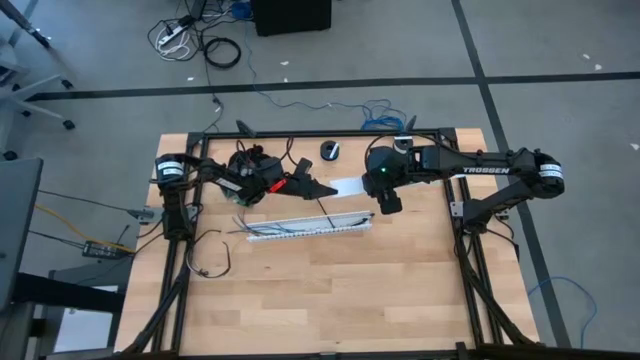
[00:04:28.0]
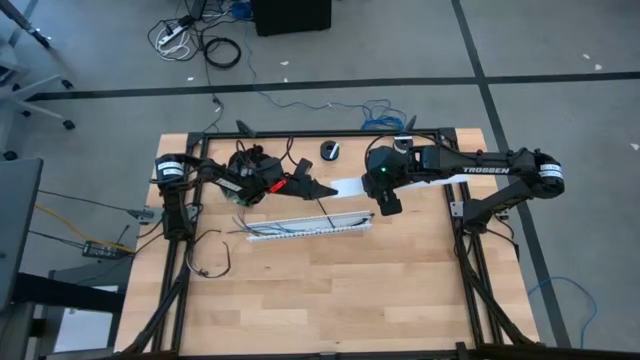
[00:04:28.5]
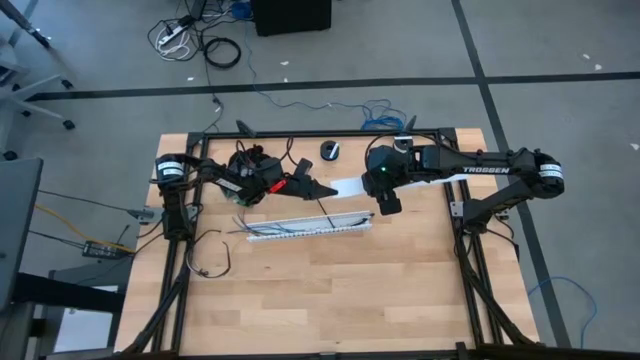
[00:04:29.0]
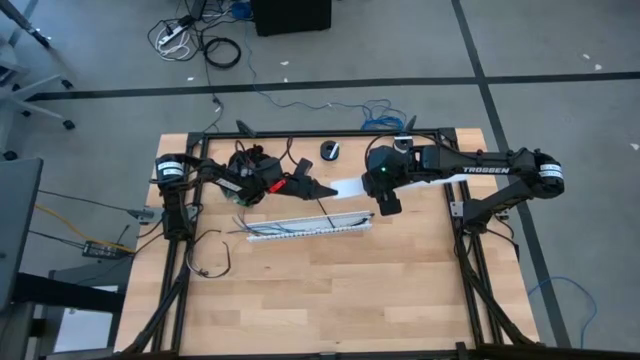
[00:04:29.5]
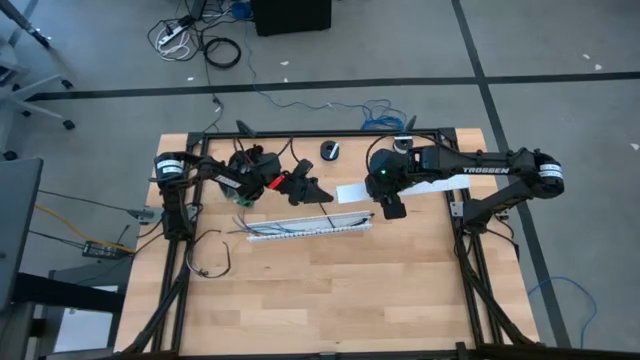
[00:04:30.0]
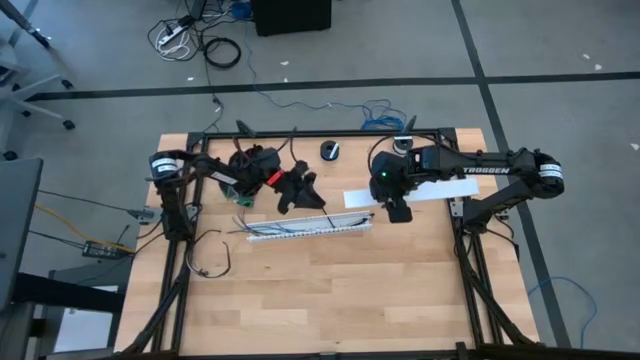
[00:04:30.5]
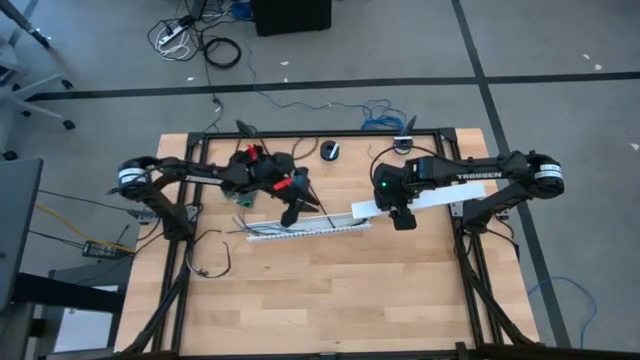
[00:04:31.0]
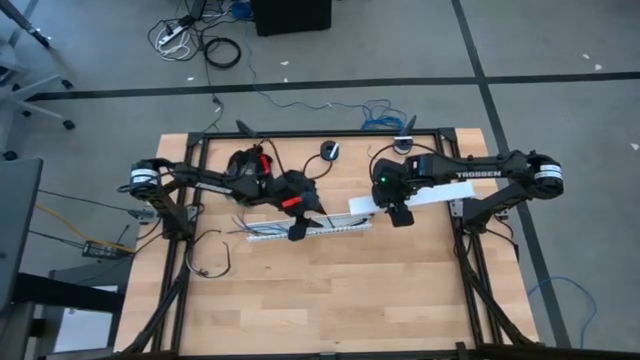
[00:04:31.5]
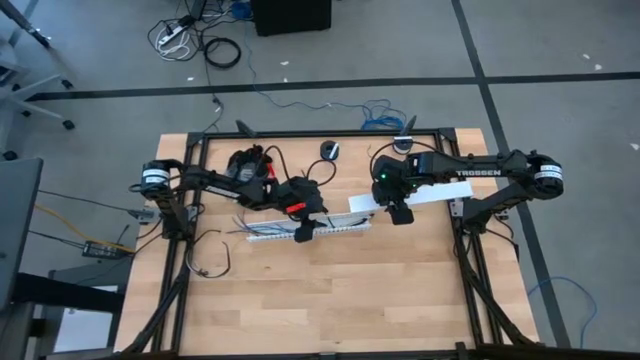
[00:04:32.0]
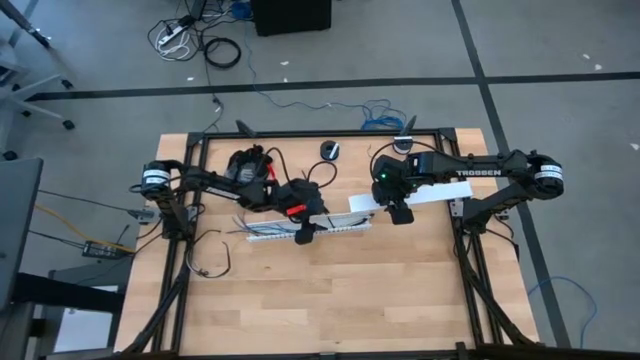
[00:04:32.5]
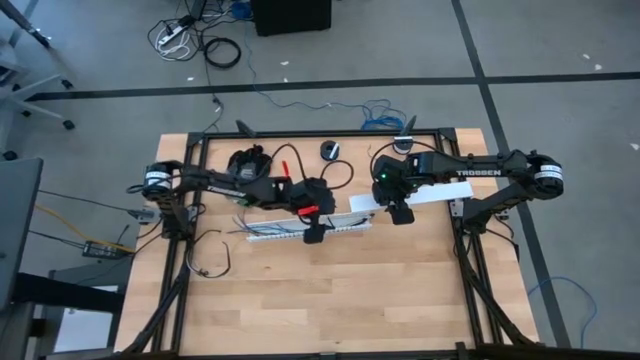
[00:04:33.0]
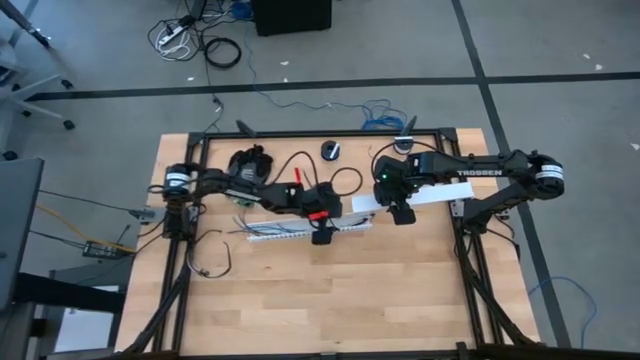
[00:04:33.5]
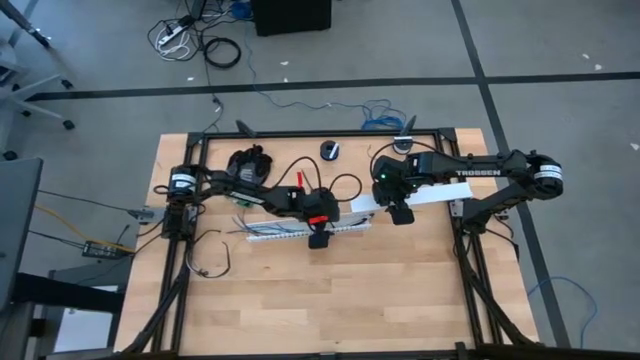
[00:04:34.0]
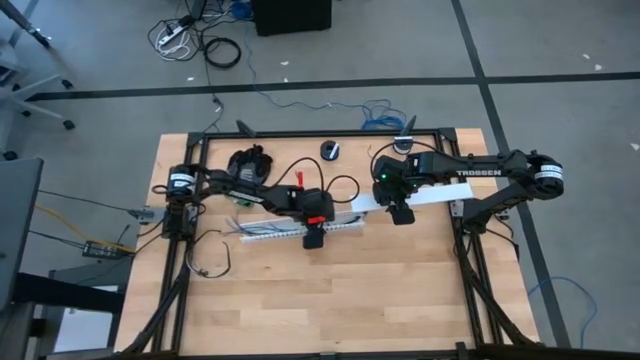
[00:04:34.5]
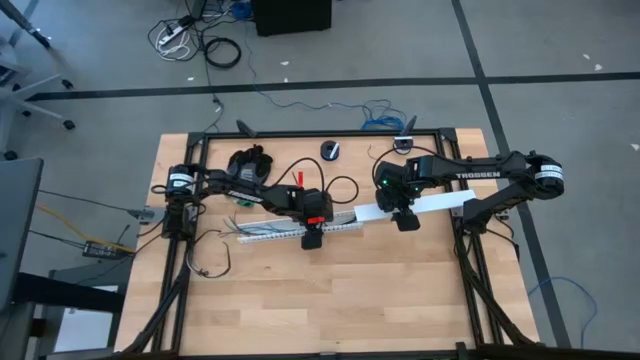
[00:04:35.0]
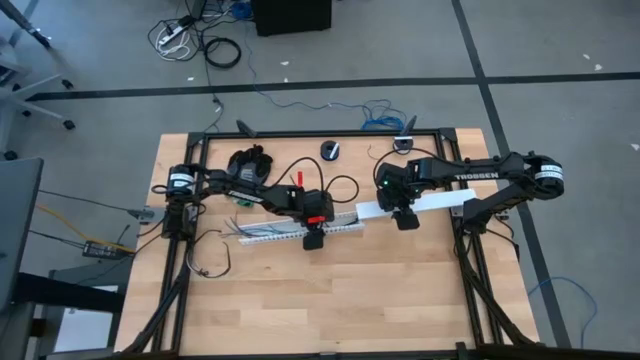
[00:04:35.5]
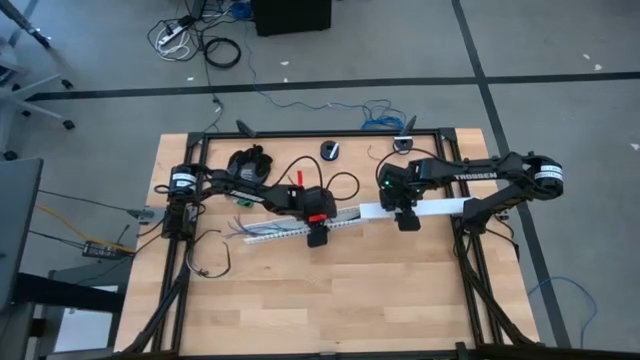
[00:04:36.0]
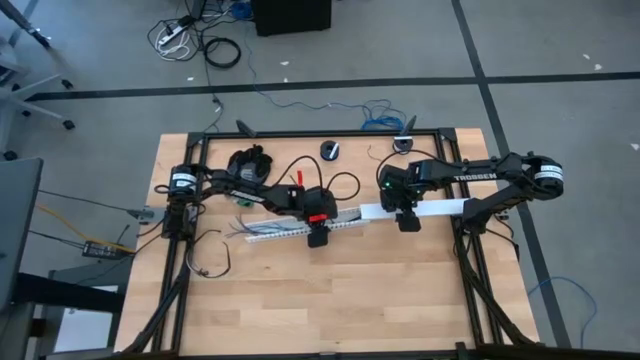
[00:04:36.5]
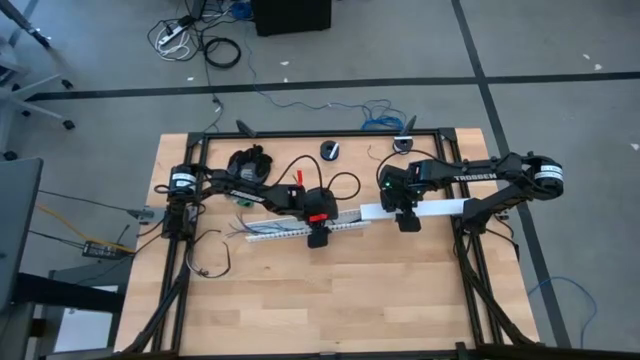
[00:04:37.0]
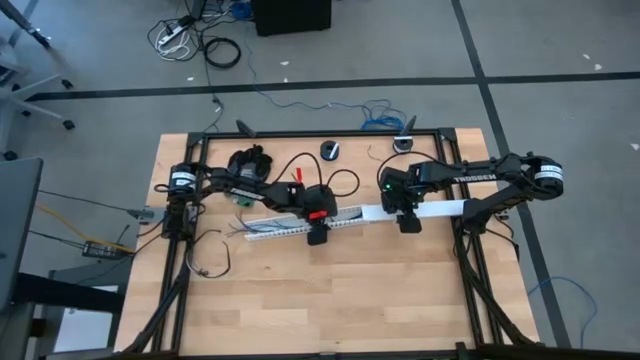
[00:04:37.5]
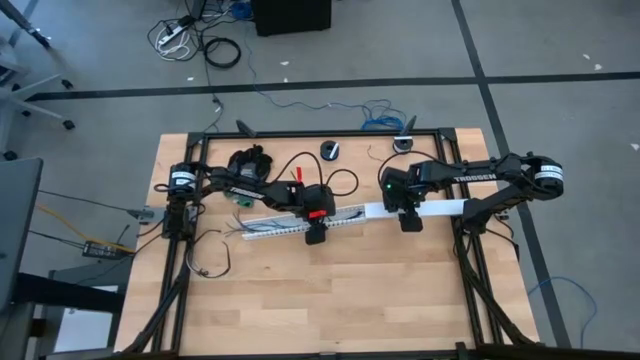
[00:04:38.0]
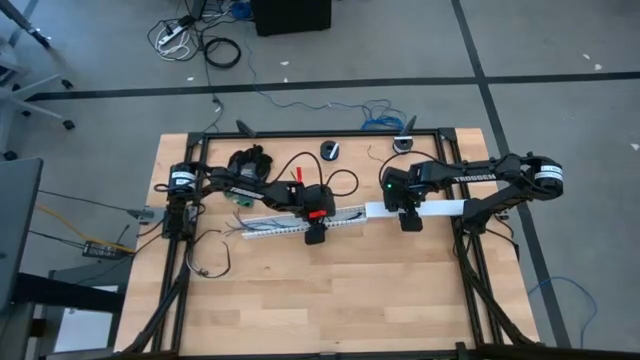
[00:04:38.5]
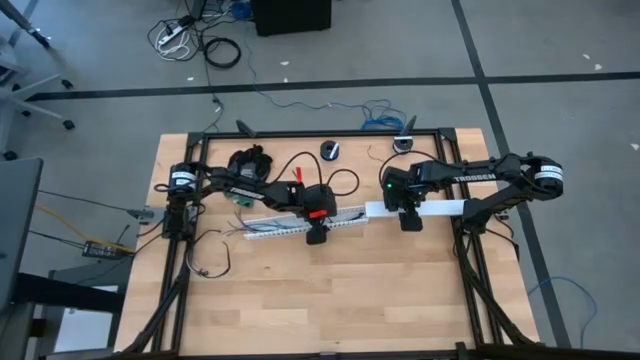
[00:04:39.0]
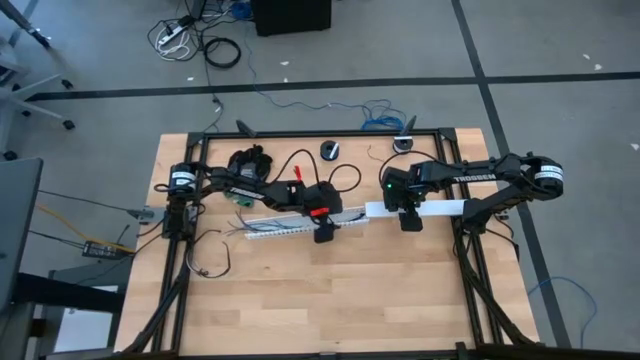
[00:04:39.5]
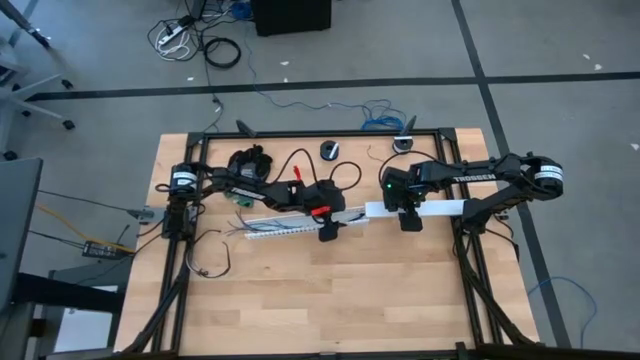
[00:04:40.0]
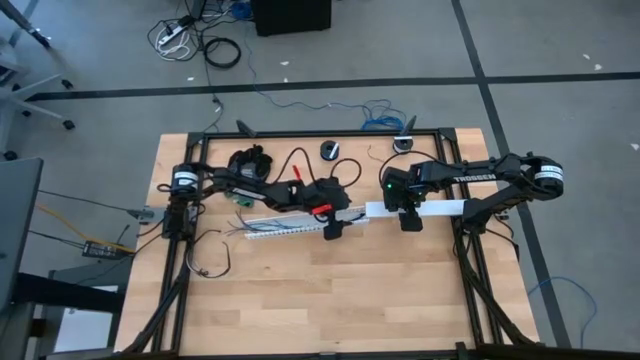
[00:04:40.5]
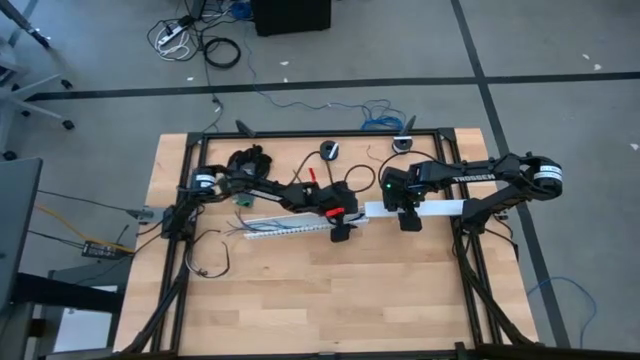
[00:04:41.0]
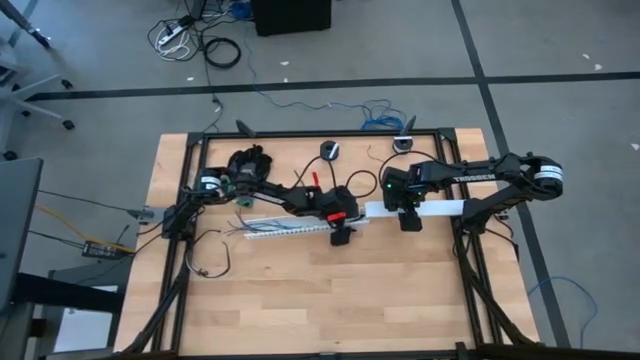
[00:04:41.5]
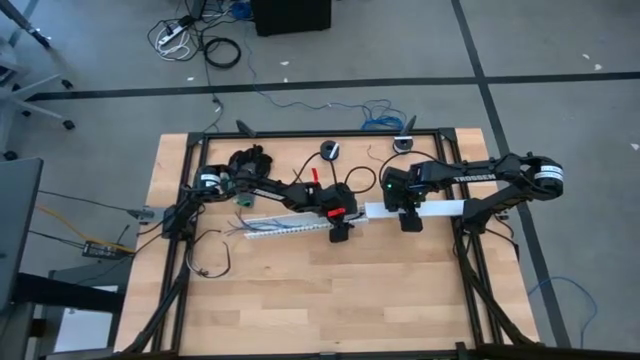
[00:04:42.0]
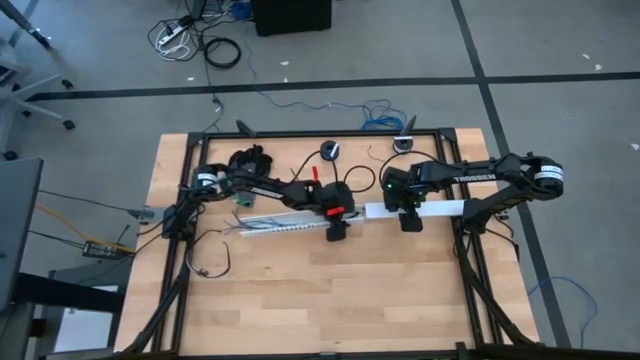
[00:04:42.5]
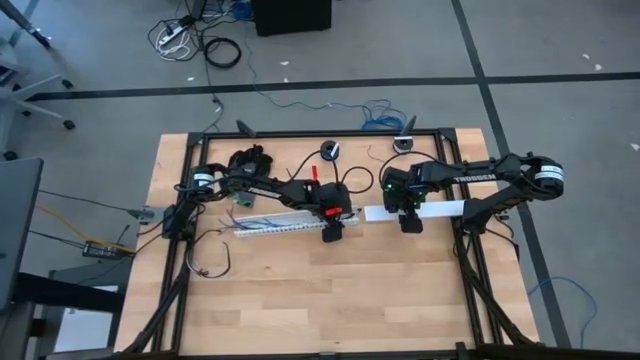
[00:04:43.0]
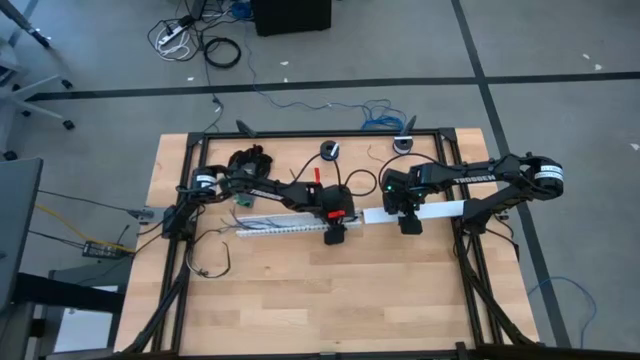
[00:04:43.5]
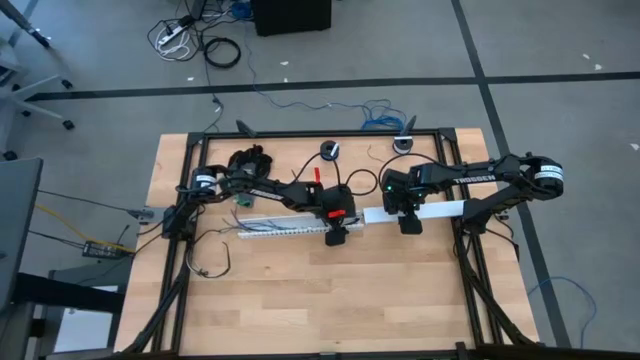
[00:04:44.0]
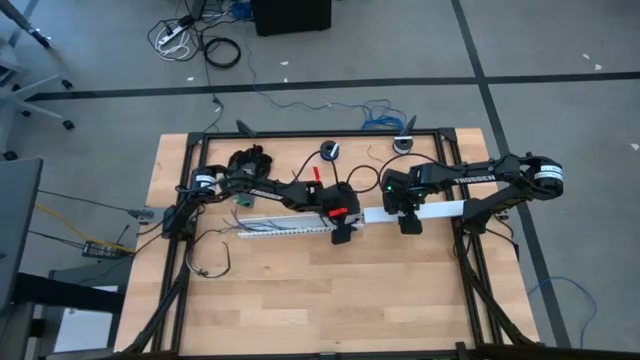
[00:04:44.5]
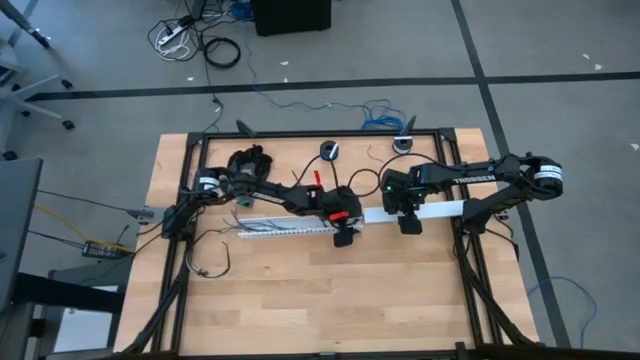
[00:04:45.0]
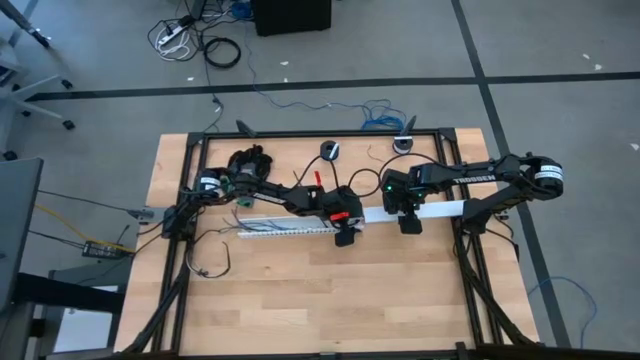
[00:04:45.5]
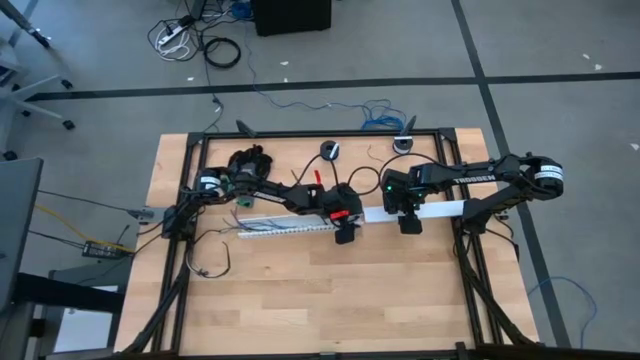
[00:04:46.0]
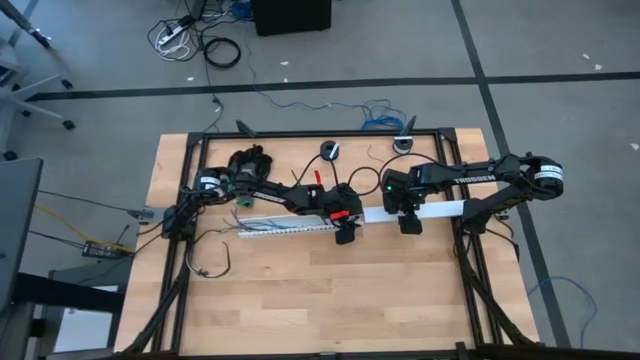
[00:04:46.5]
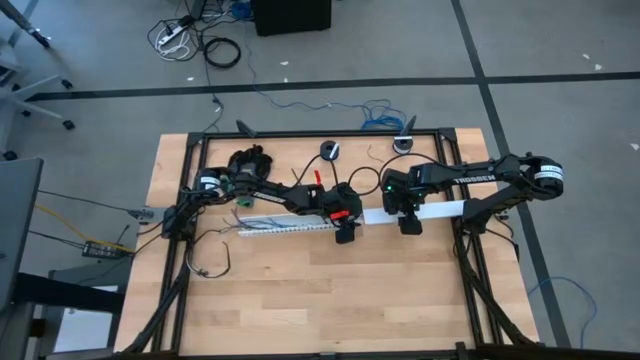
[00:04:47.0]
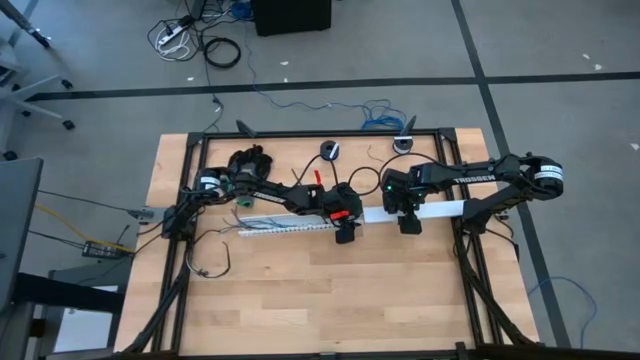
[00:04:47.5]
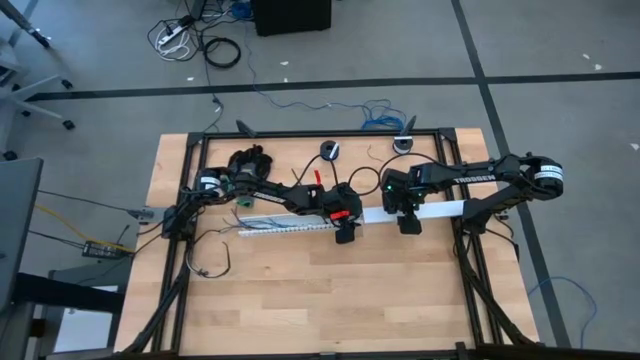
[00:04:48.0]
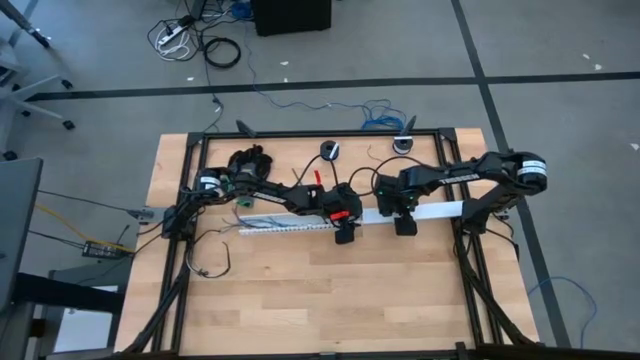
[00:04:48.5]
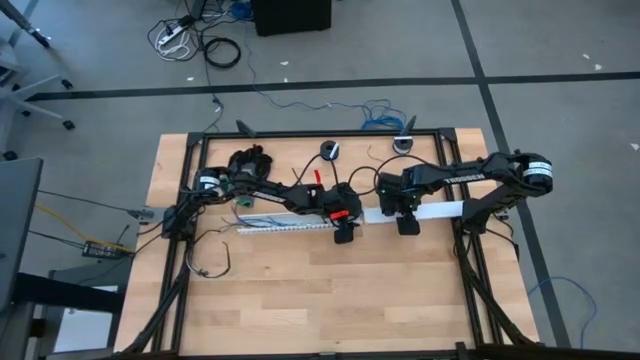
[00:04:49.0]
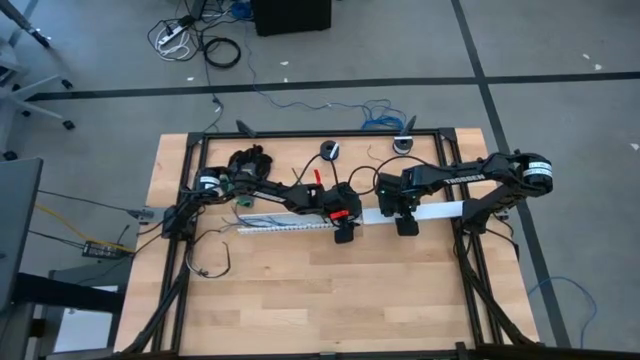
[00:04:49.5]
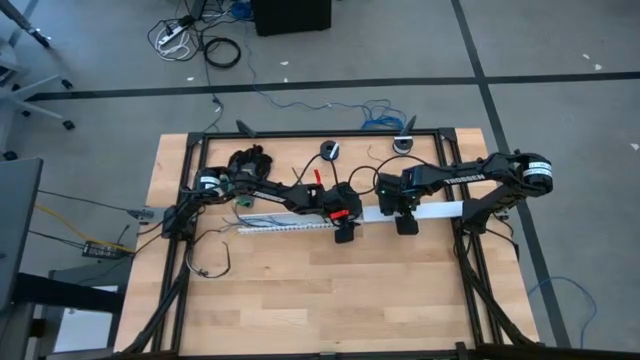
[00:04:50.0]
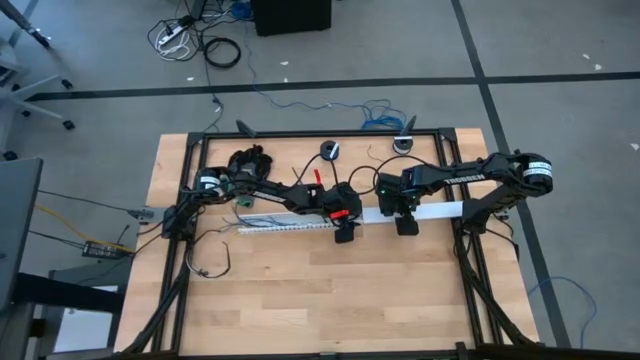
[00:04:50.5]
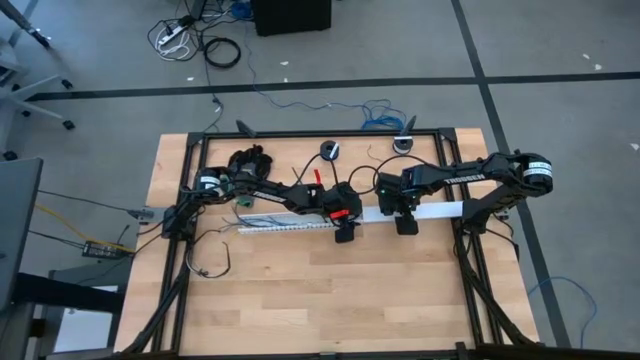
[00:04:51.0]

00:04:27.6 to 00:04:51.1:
Task: Ziptie cables
Close the white cable duct
